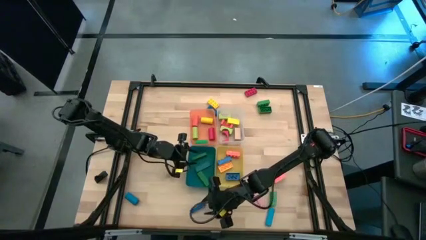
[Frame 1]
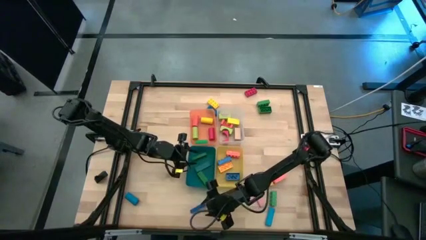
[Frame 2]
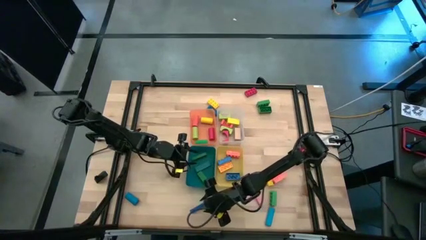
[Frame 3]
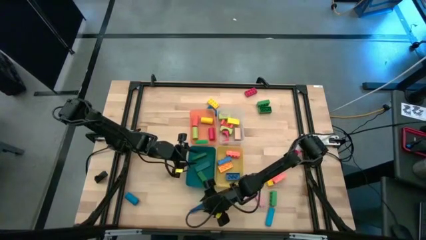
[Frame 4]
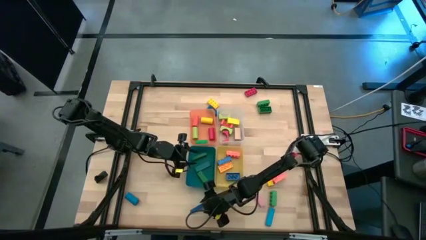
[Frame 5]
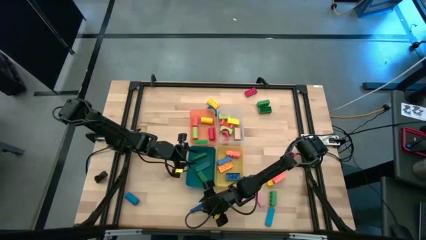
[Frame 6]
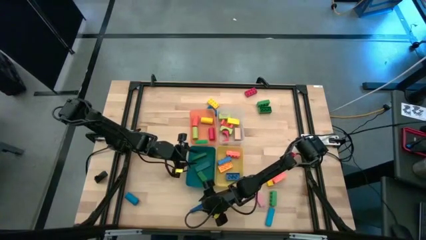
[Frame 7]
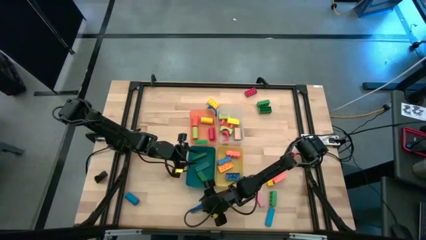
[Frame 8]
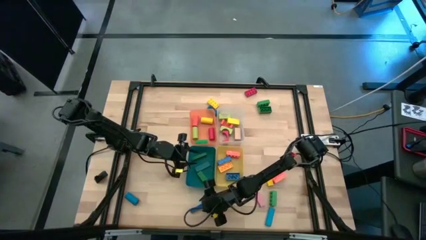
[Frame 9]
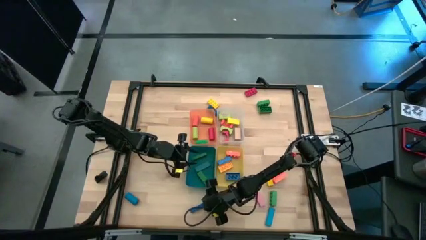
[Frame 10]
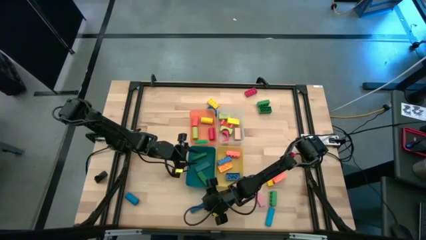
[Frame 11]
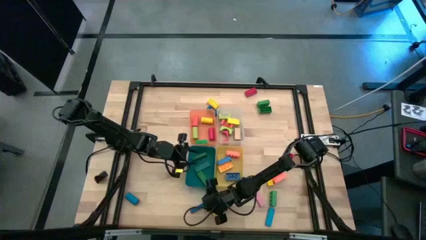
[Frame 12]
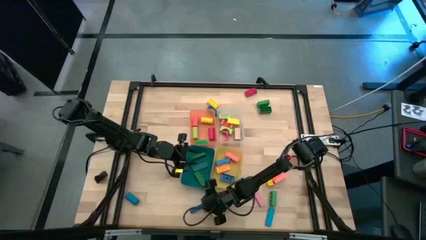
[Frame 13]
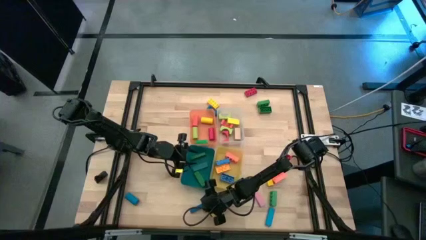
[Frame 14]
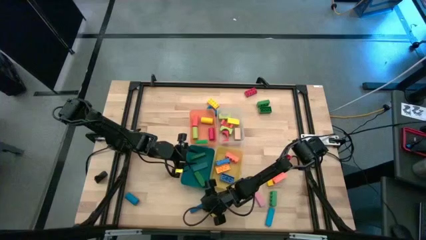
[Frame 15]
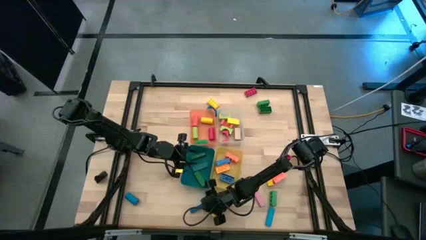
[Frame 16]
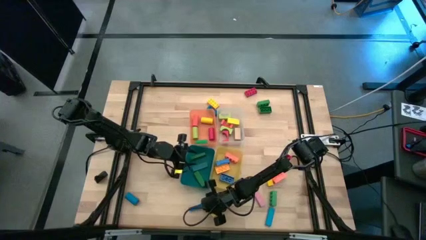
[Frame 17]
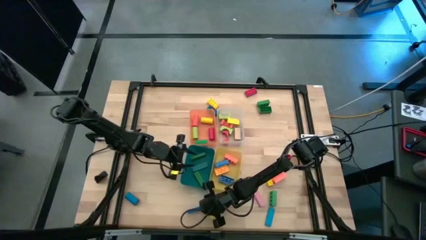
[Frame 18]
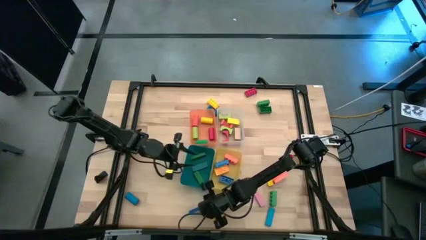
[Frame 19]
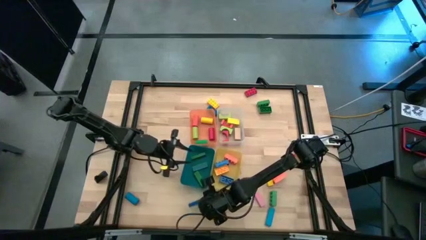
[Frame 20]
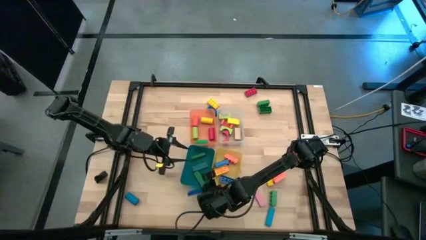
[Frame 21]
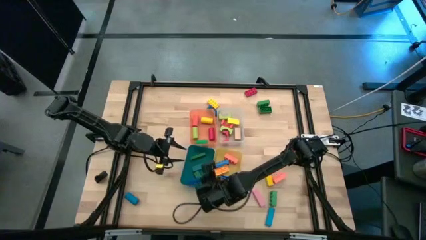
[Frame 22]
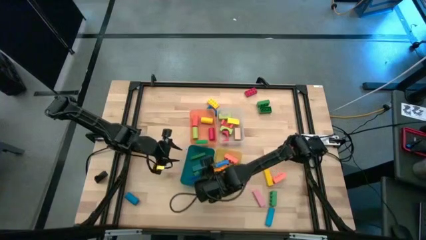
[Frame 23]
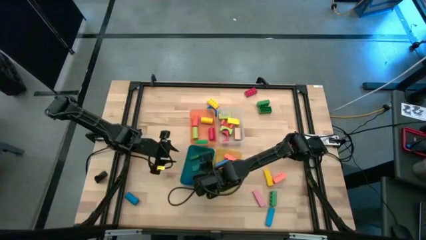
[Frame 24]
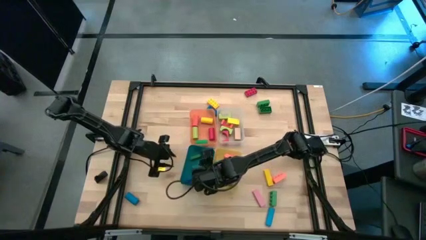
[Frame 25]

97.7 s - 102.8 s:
Task: Sort blocks by size
Put the dark blue rectangular block into the blue bin

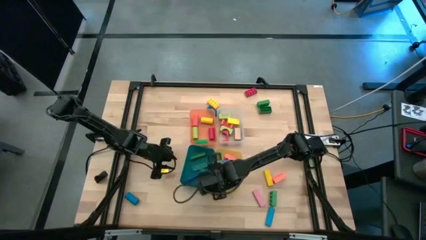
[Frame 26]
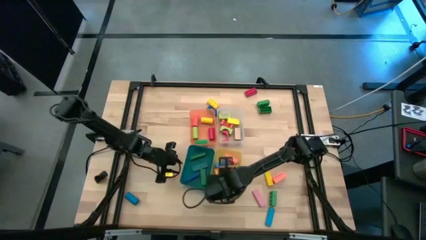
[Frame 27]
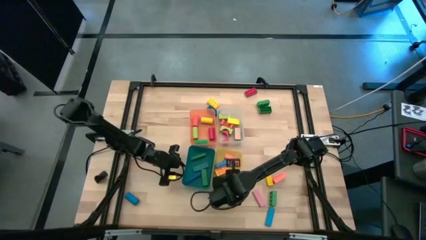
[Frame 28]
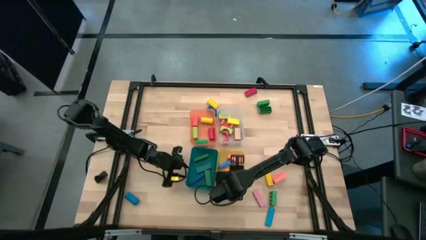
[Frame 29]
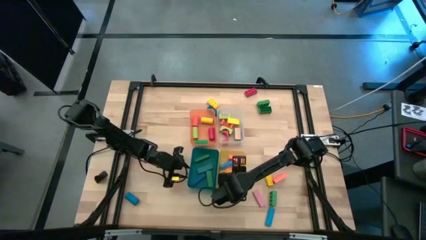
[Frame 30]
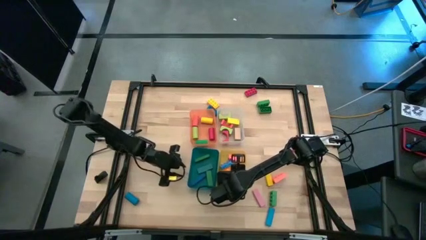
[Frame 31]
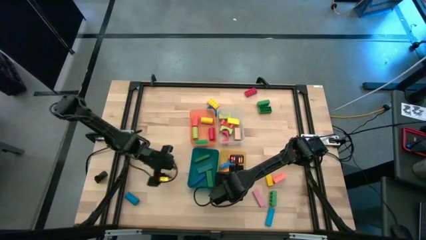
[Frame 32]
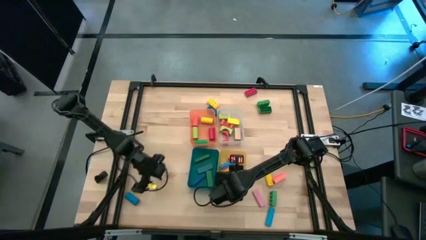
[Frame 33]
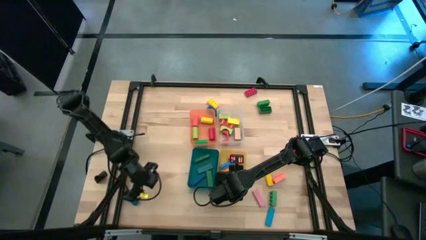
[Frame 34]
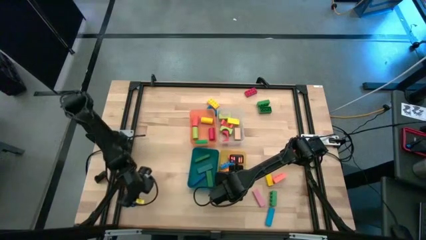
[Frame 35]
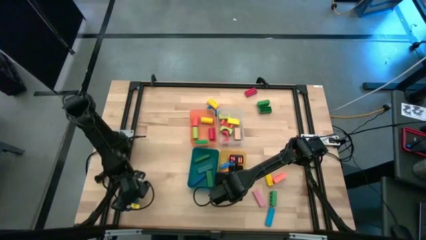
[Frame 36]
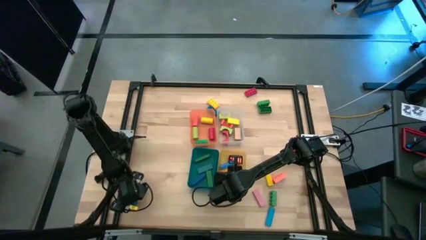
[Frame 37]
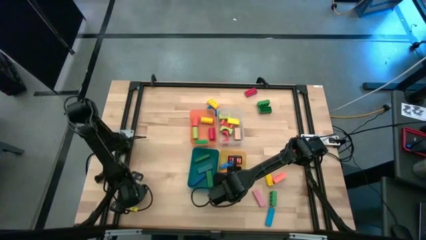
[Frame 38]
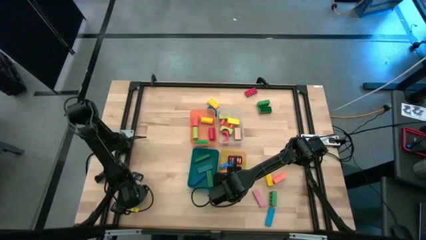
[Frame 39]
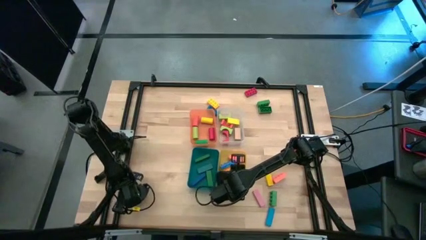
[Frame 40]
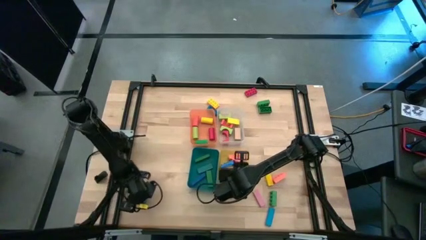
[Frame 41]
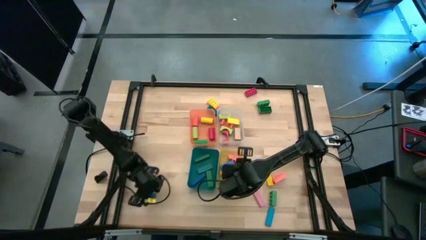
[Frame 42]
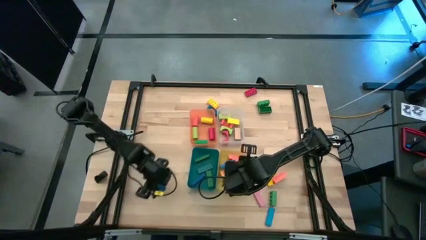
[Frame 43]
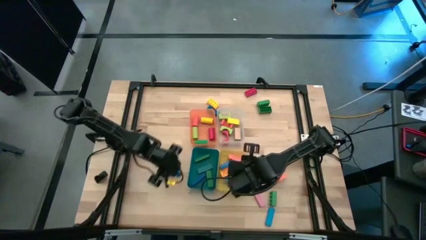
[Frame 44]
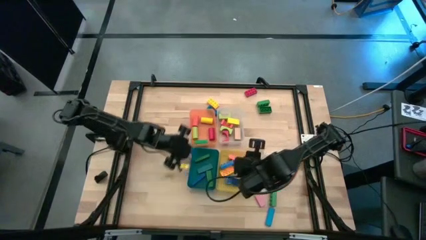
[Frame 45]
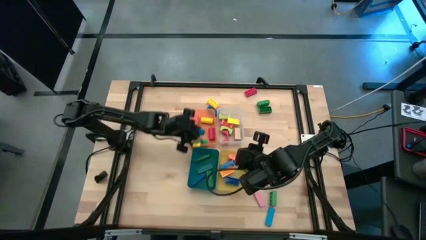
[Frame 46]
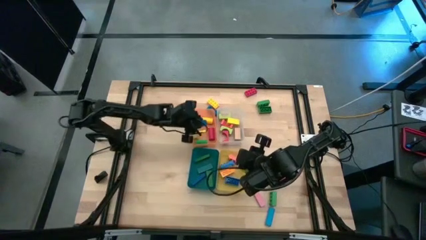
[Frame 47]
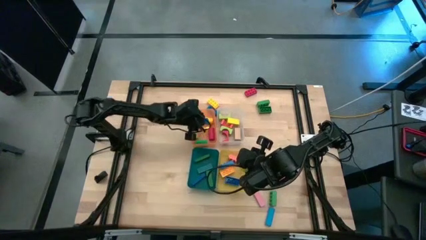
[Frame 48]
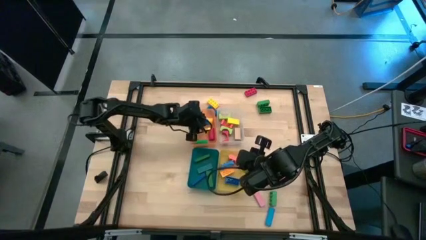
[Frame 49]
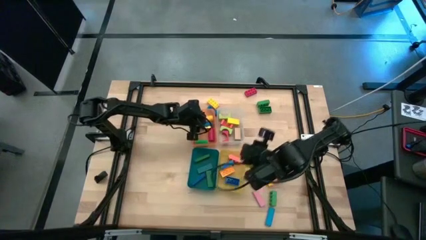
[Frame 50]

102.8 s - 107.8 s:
Put the blue cylindrical block into the orange bin

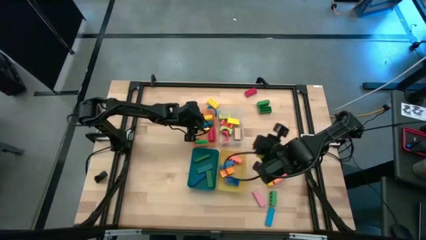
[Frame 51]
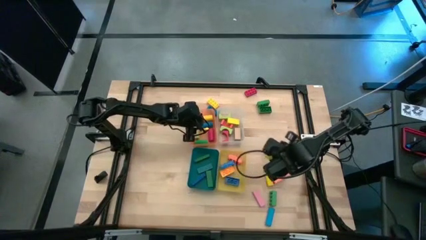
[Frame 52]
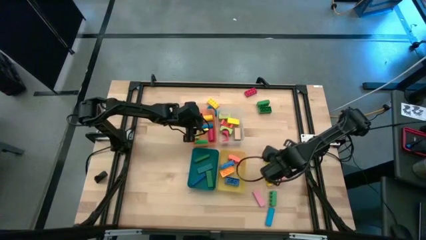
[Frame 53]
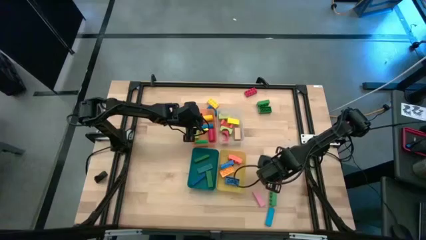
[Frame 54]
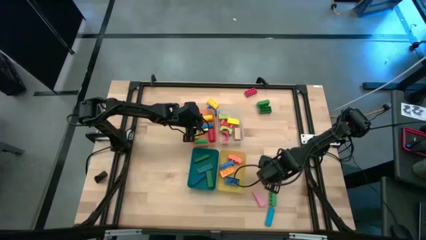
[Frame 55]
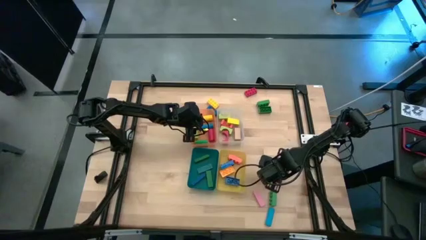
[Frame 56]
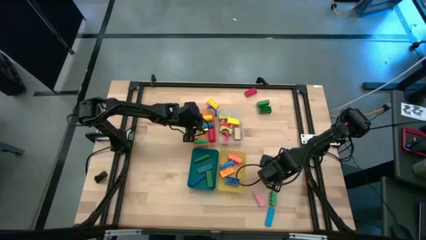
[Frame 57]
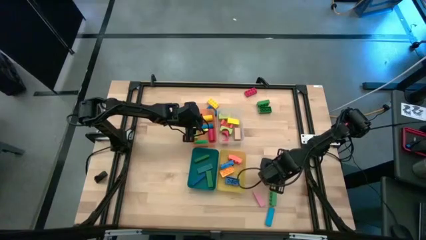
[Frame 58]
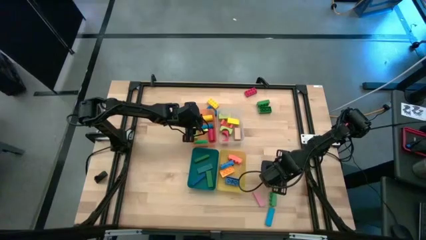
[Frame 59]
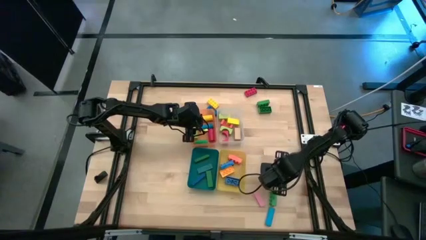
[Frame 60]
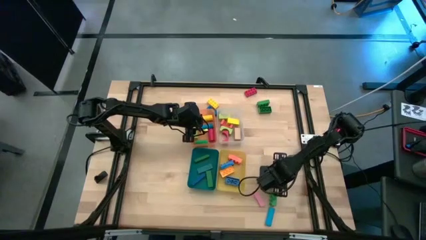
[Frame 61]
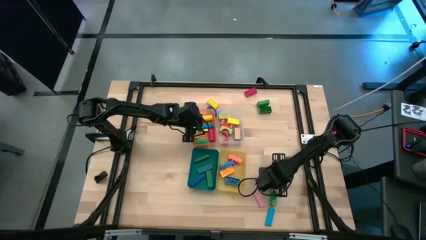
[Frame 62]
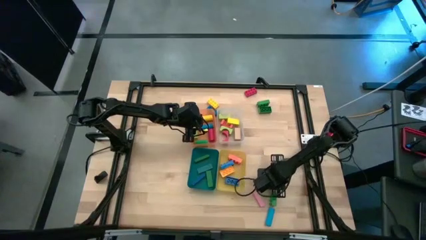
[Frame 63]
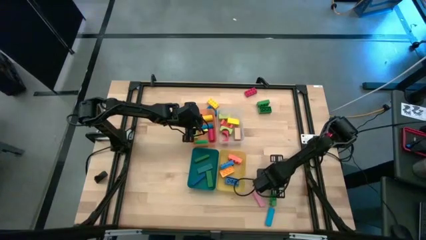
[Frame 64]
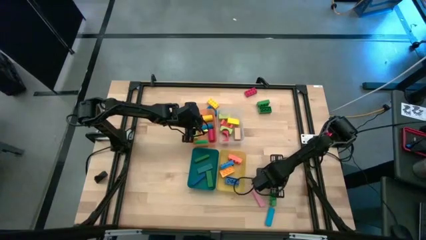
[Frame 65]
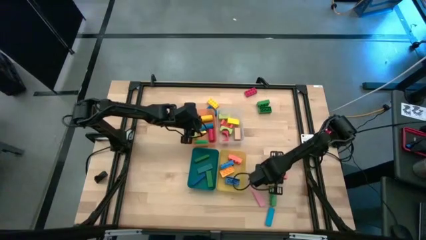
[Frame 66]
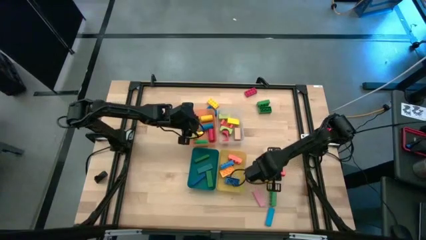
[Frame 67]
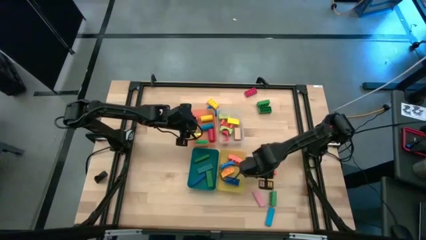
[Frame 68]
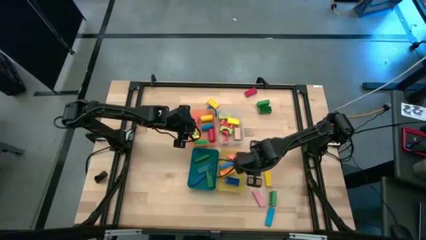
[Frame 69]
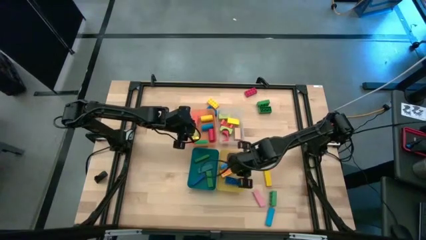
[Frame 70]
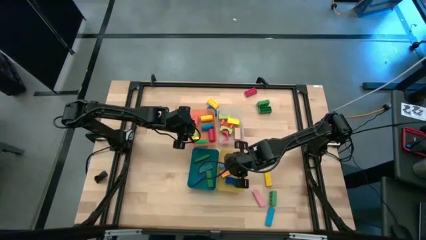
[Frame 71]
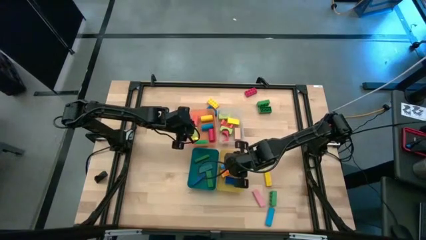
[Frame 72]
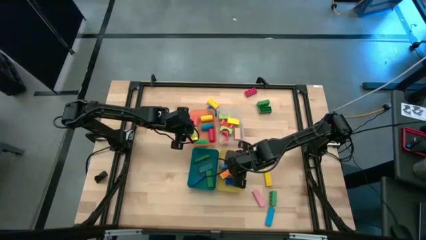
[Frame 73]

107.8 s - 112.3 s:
Put the orange game piece into the yellow bin

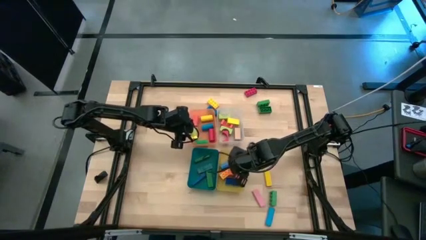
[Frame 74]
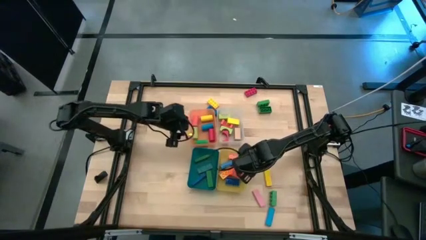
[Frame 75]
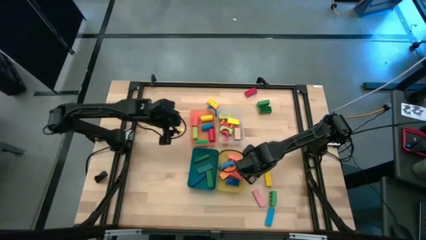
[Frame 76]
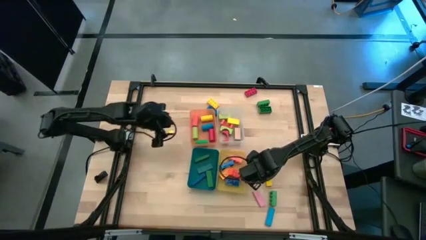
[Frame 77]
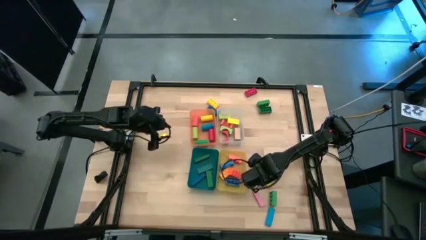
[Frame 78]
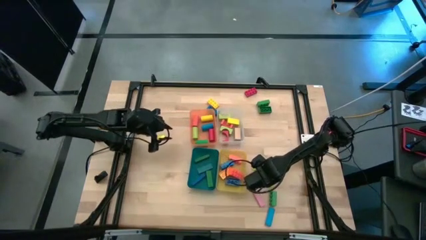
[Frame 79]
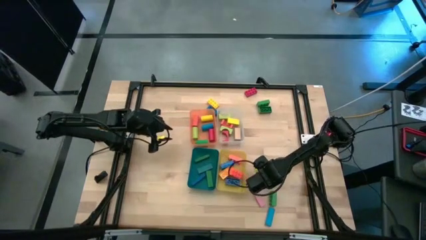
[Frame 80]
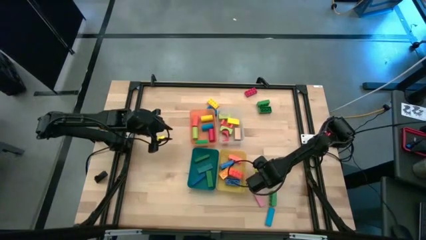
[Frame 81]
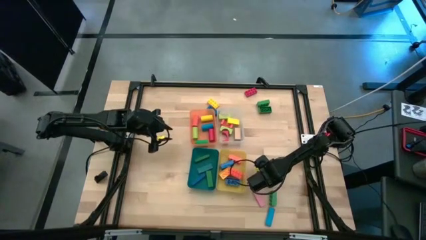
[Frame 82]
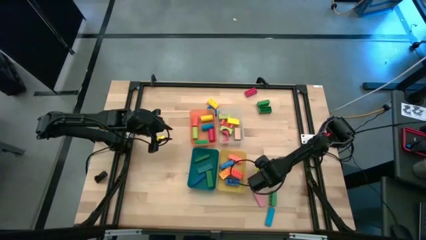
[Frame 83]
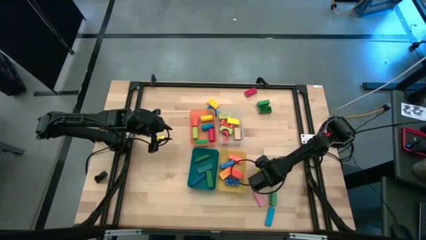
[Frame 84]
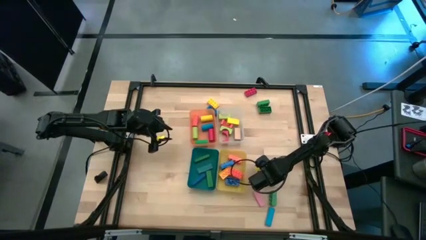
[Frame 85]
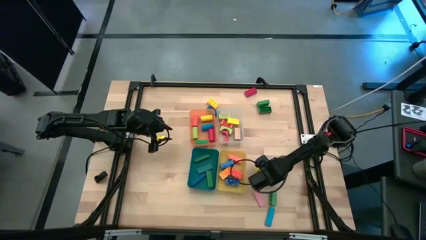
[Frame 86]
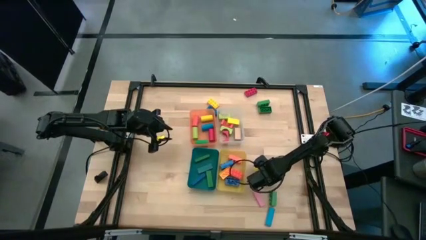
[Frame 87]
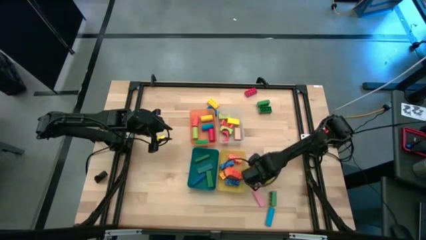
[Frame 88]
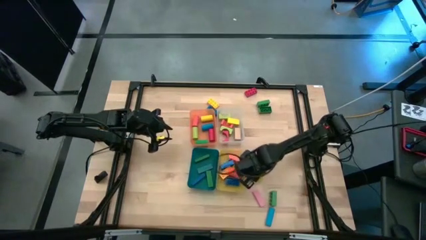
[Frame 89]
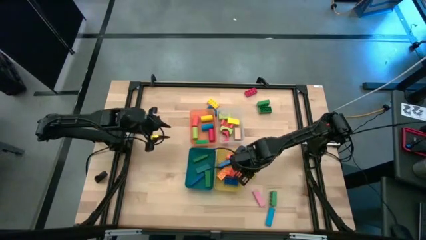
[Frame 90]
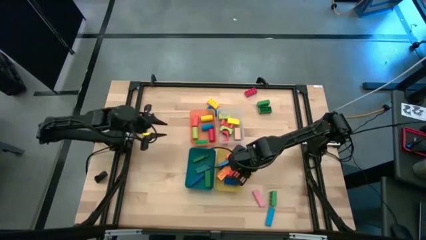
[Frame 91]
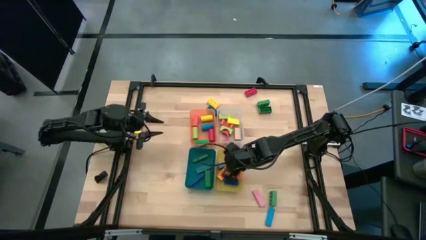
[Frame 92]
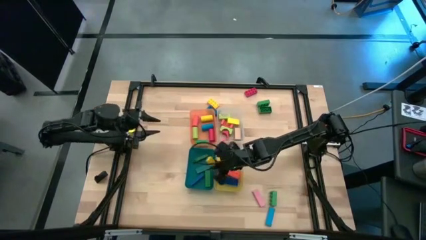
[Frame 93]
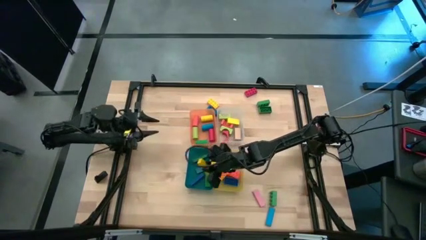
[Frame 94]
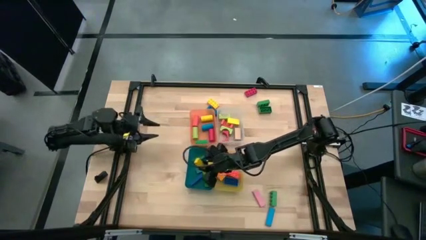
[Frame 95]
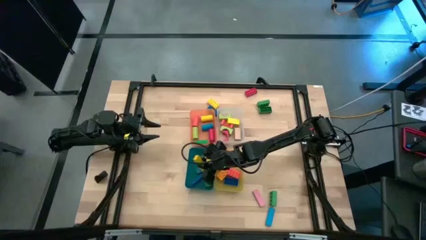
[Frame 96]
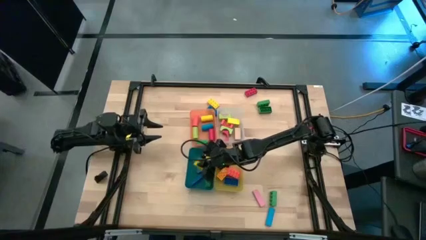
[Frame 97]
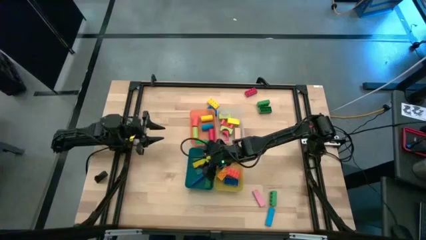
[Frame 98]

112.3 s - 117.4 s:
Put the yellow rectangular block into the blue bin
